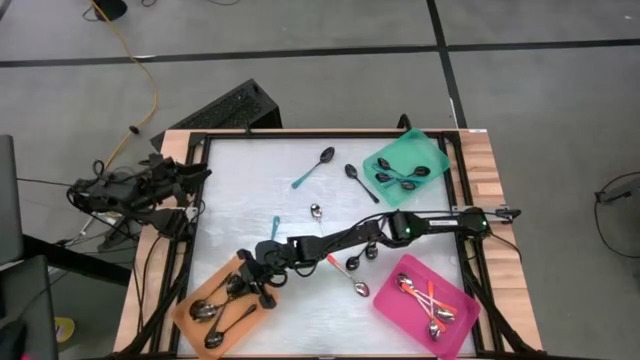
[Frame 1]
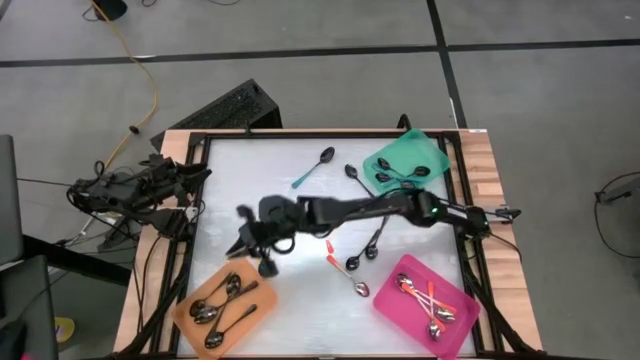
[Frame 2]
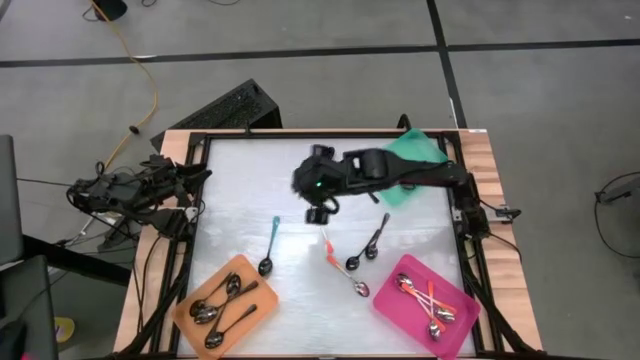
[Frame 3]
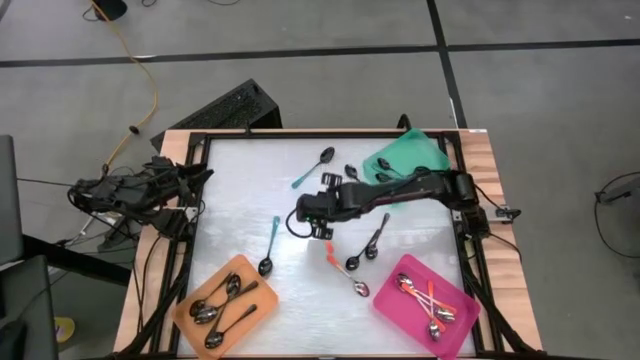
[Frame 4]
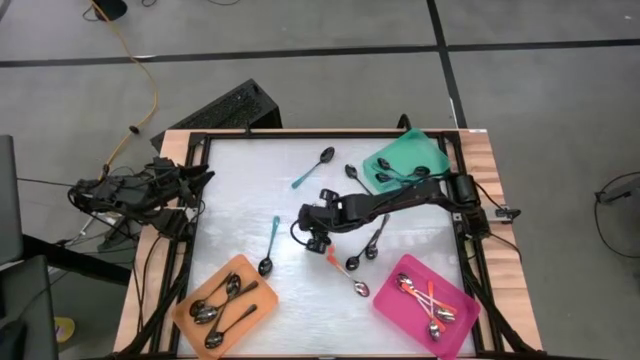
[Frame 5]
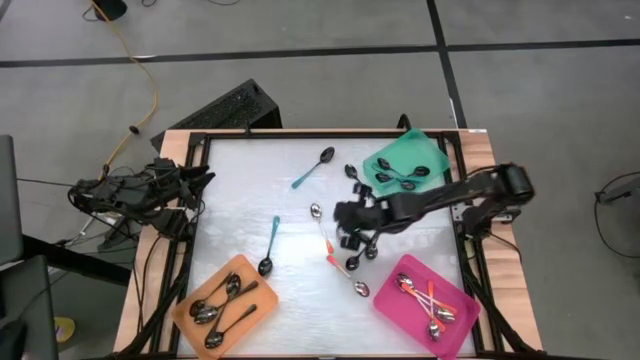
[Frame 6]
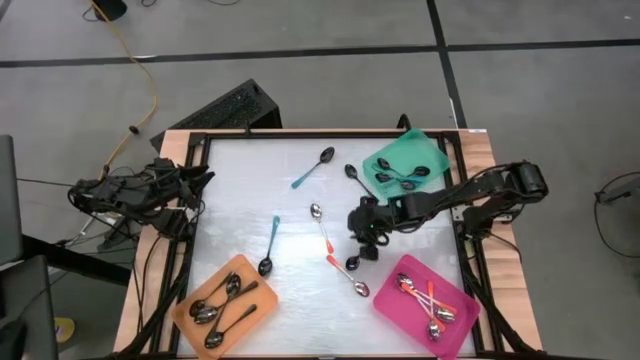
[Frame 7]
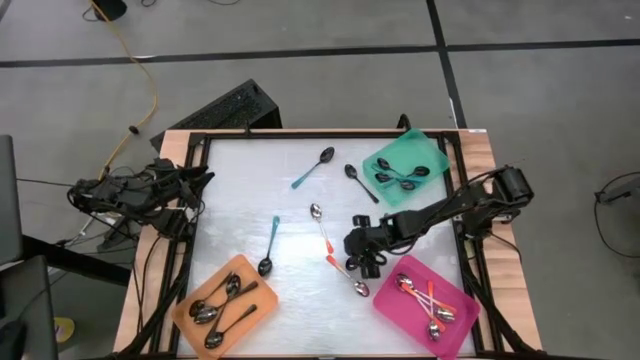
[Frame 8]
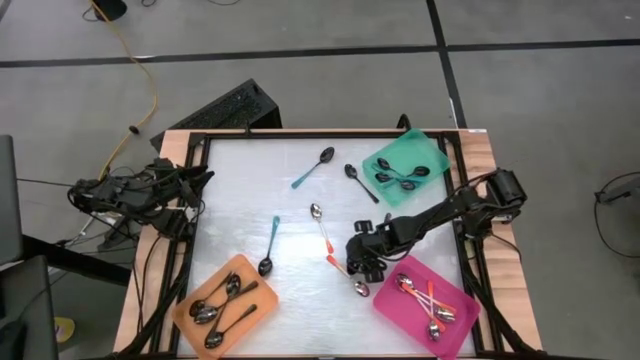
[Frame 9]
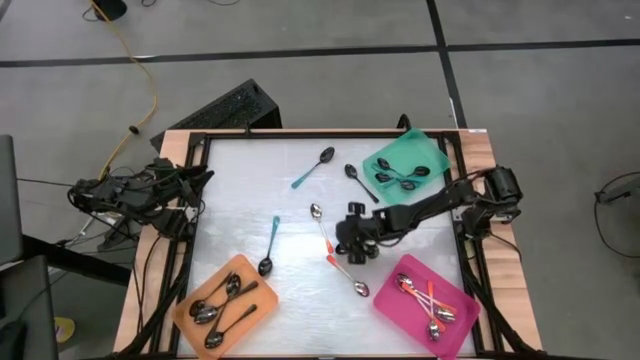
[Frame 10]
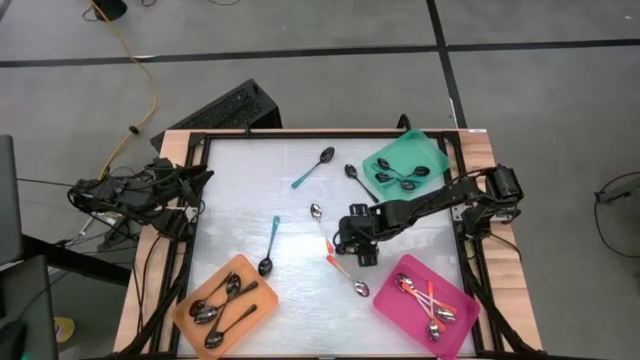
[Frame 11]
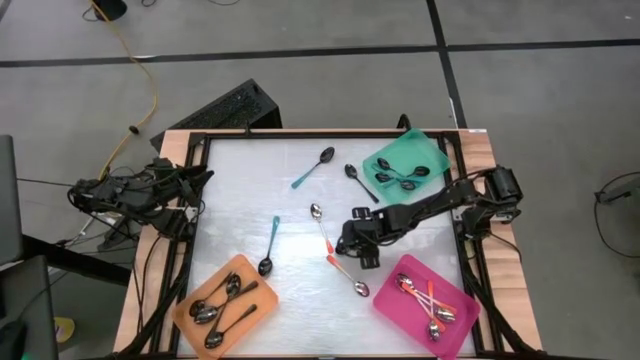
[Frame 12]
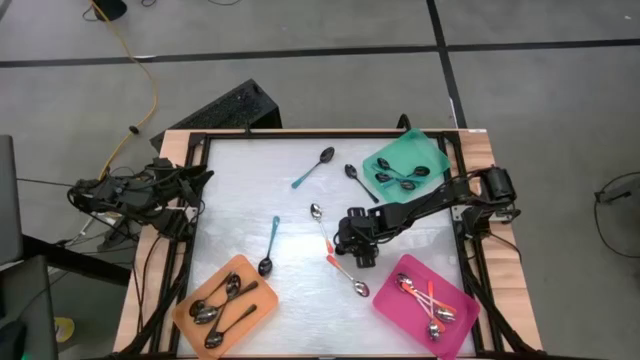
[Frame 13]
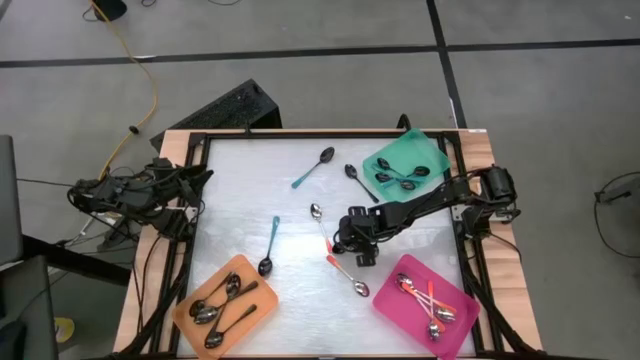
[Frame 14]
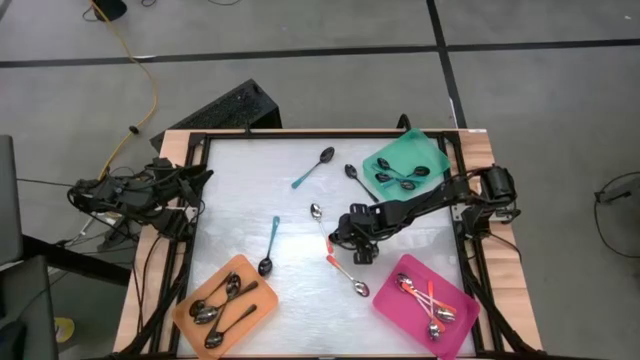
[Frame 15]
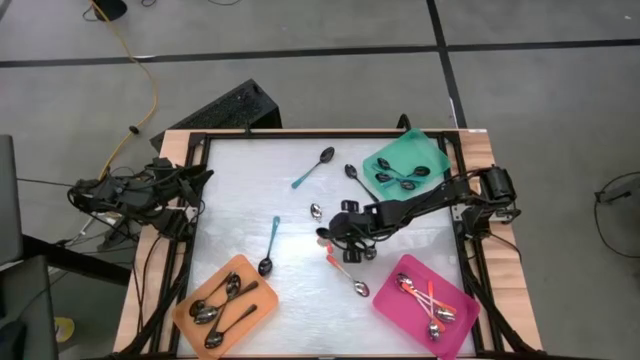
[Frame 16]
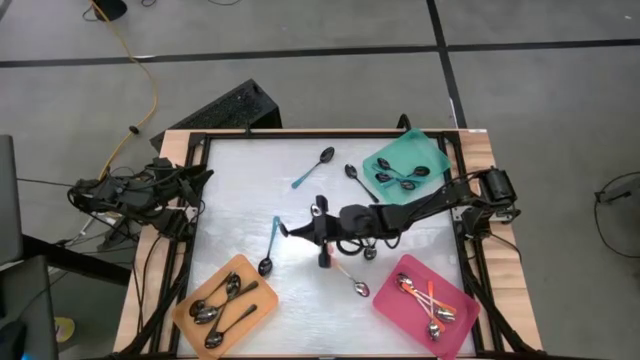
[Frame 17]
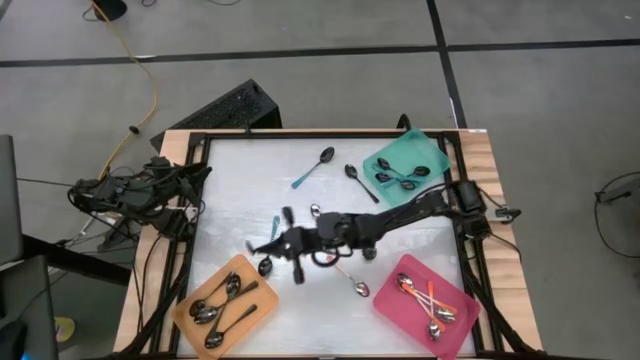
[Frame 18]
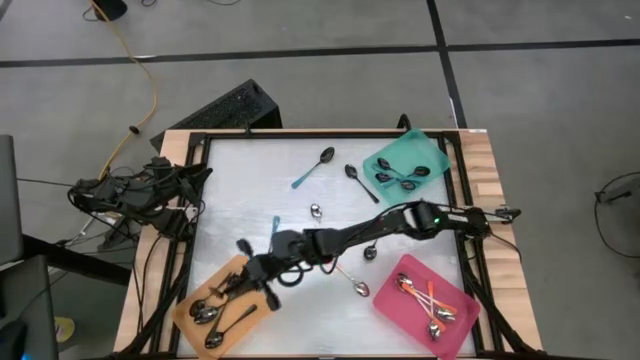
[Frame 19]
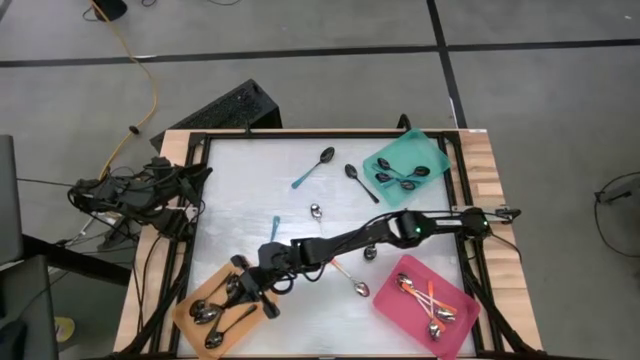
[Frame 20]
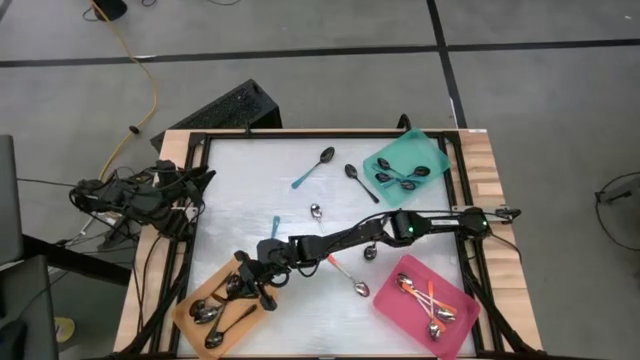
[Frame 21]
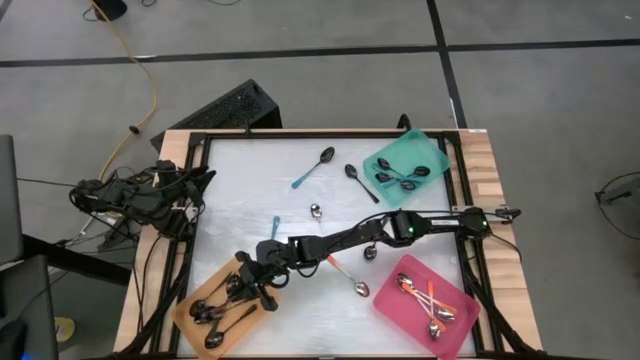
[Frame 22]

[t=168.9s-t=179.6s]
Task: Sort silverware by color (type)
Put the black spoon into the orange bin

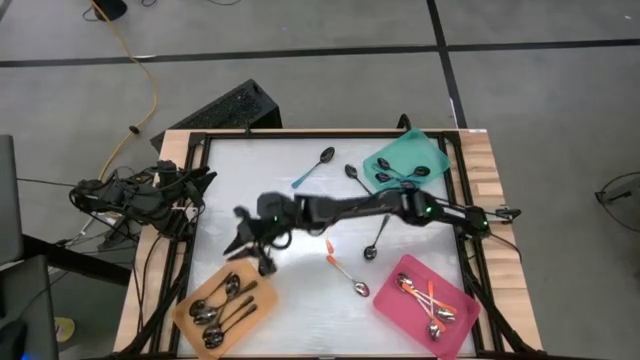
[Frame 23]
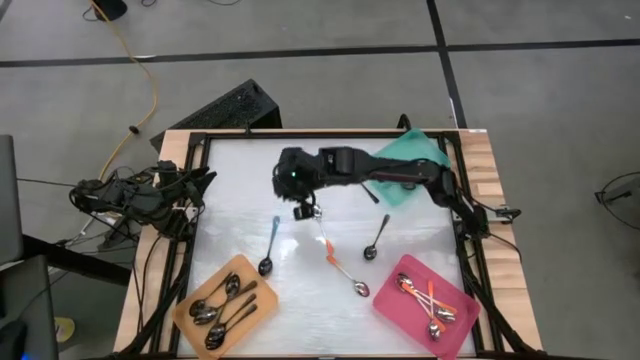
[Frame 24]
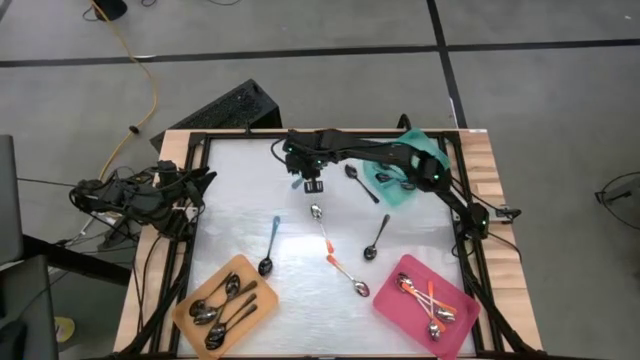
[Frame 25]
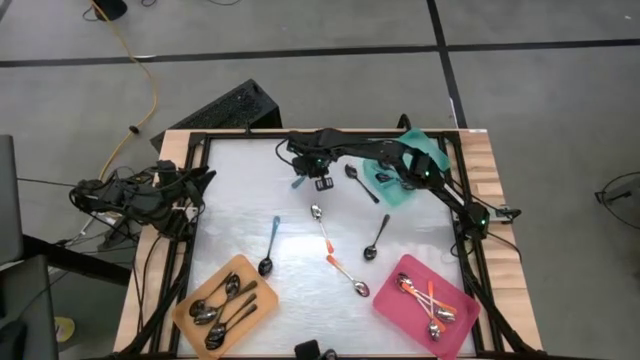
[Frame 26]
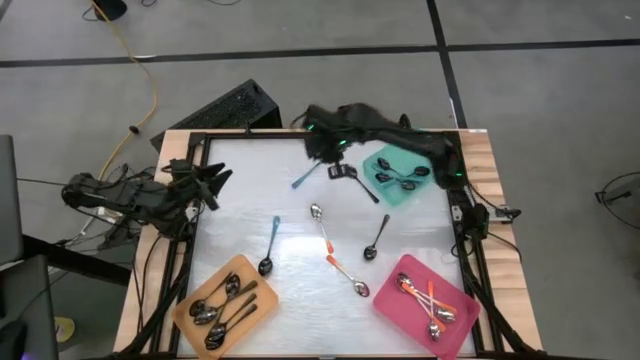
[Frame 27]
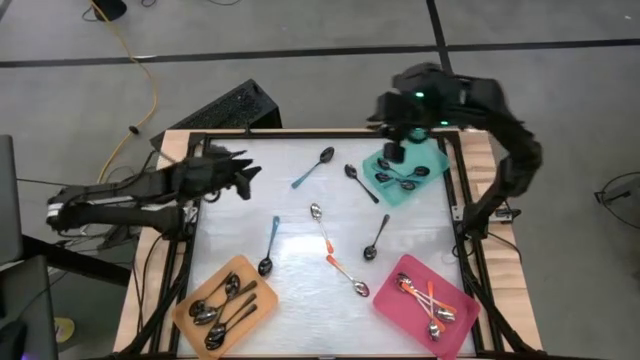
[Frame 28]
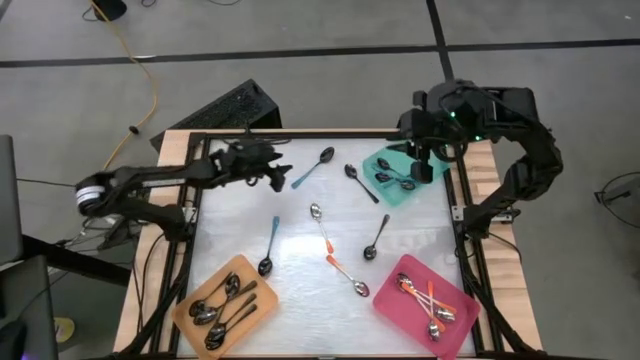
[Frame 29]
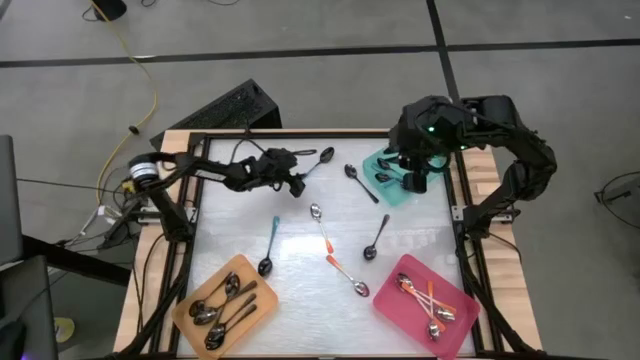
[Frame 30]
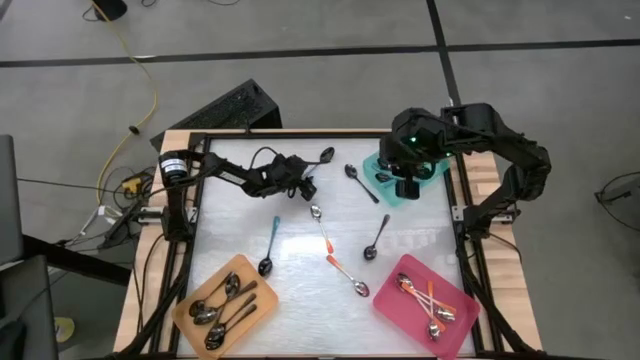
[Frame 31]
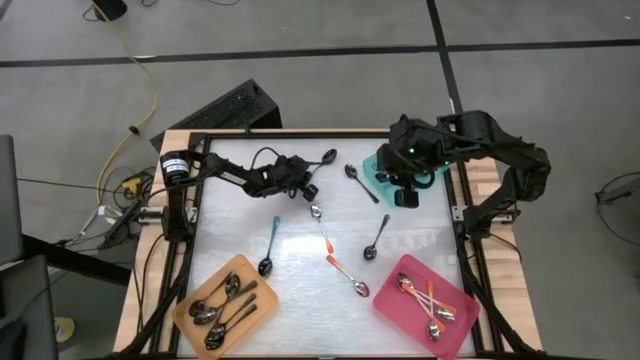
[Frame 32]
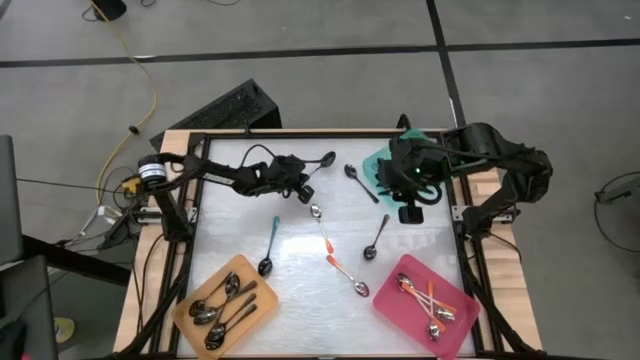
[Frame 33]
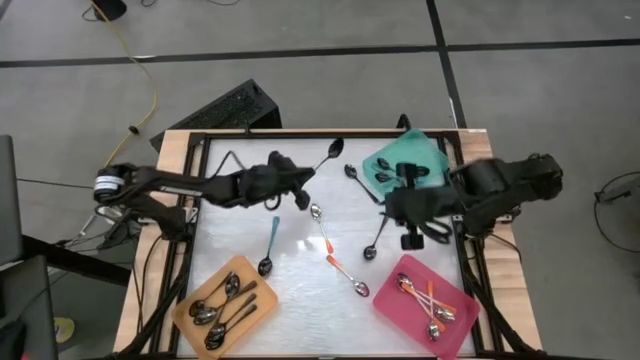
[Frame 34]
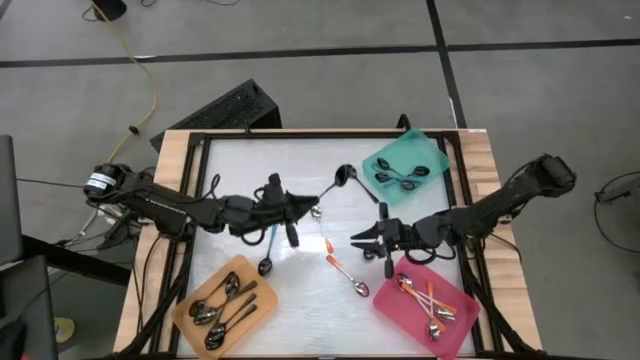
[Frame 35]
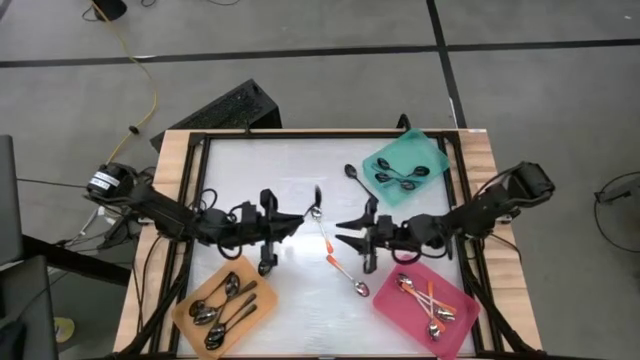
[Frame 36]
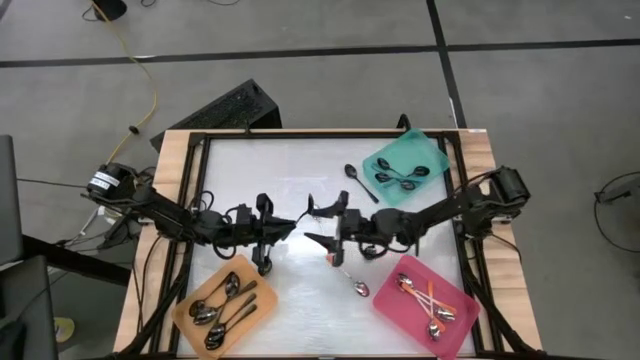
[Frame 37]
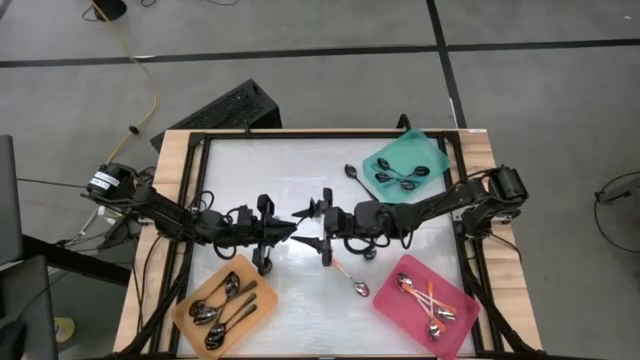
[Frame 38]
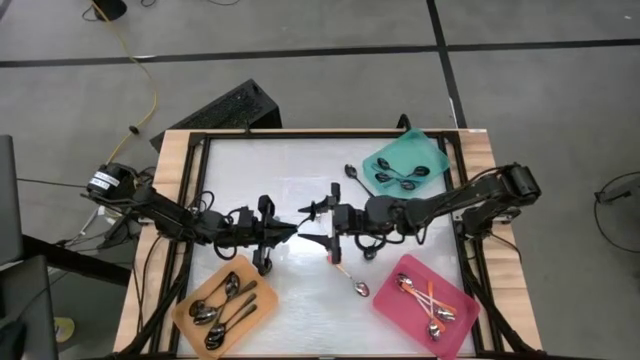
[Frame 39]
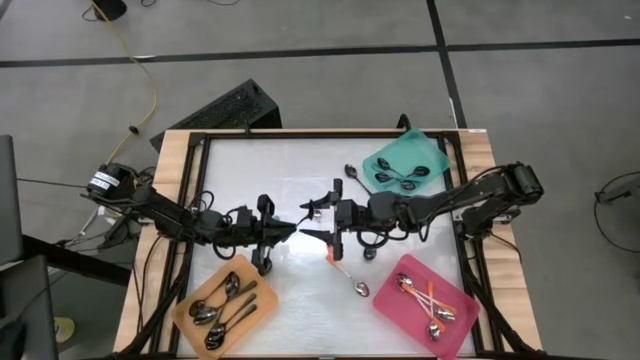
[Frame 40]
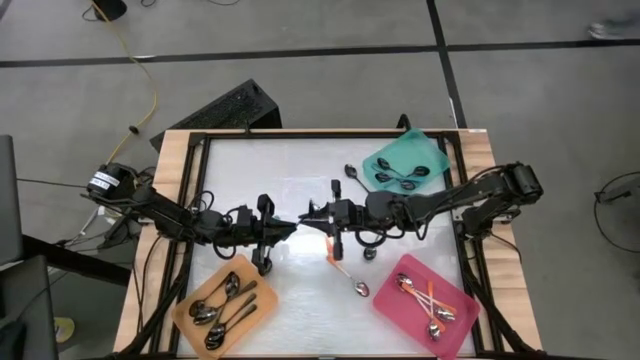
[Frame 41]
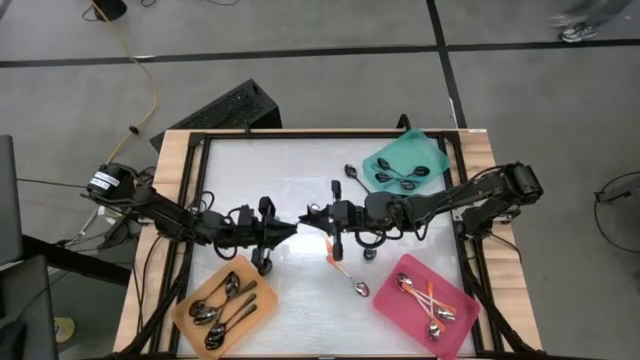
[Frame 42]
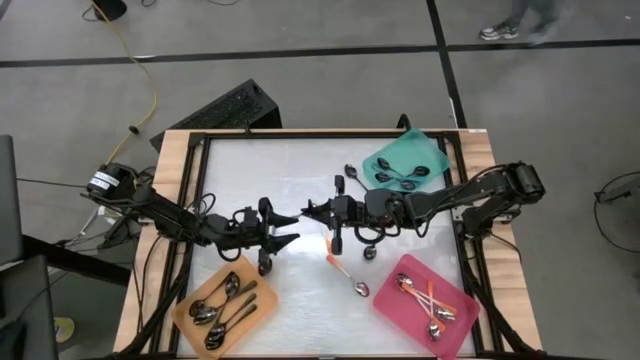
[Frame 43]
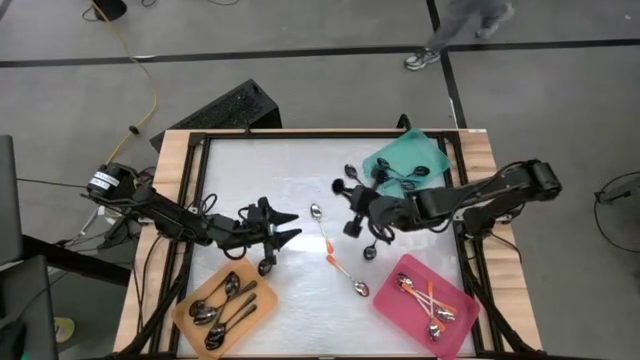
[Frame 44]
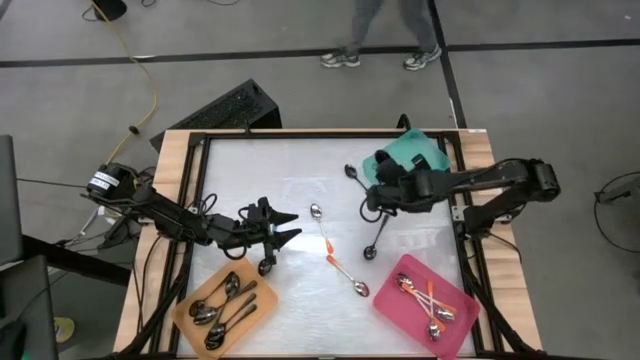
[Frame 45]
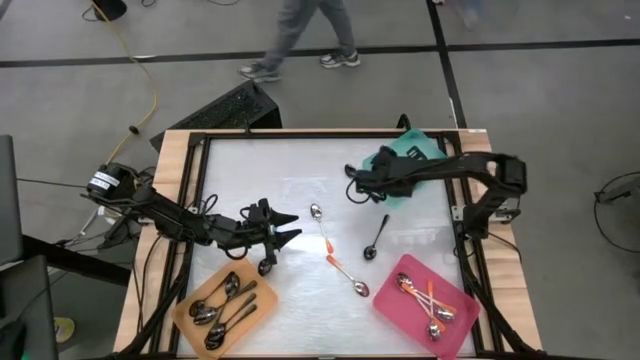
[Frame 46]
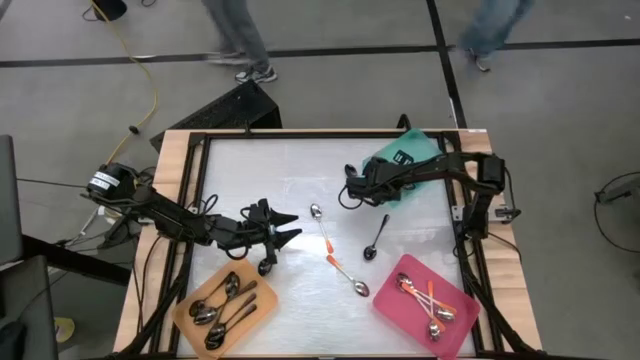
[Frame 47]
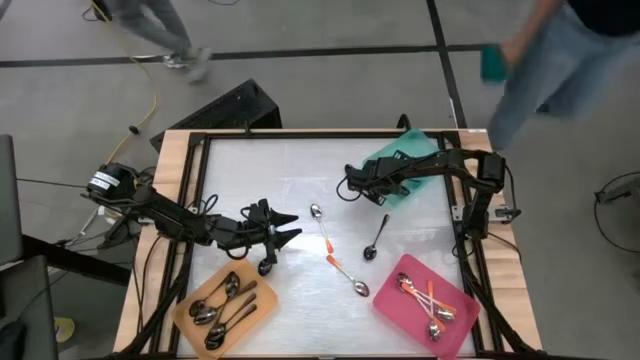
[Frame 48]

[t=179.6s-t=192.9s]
Put the blue spoon into the blue bin
